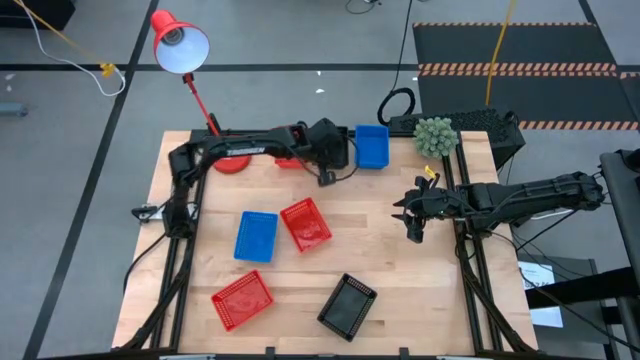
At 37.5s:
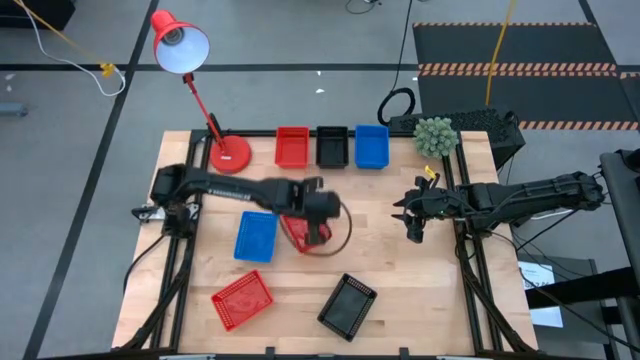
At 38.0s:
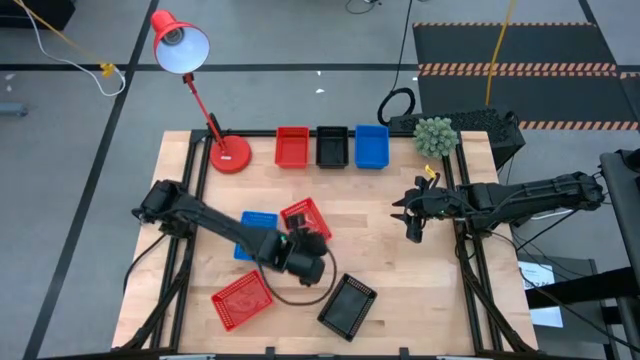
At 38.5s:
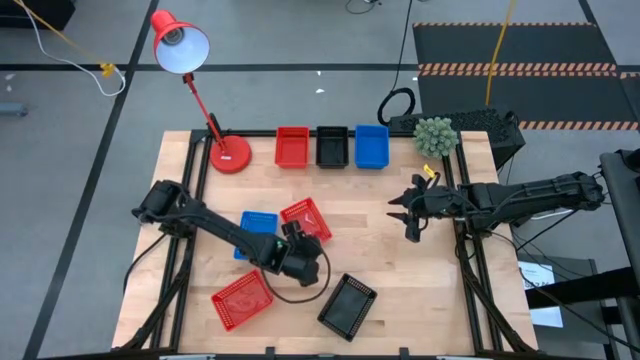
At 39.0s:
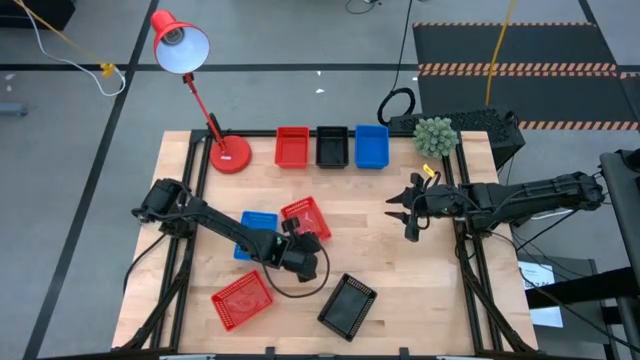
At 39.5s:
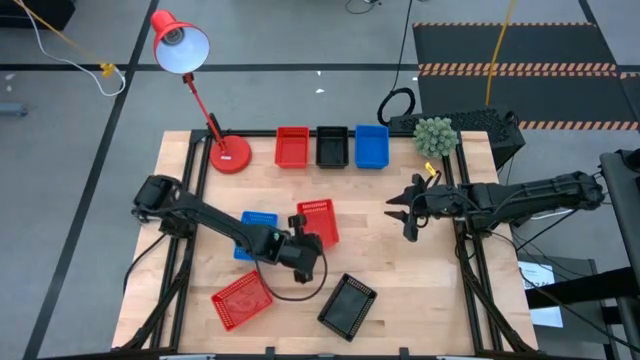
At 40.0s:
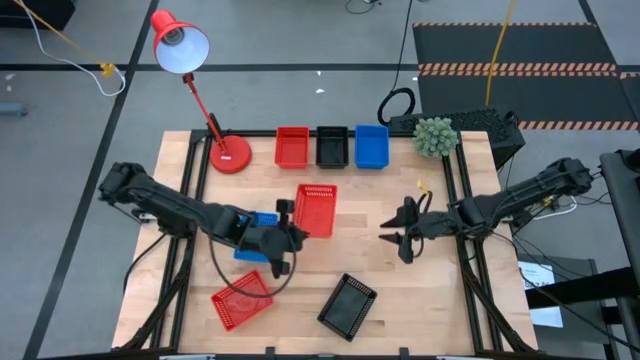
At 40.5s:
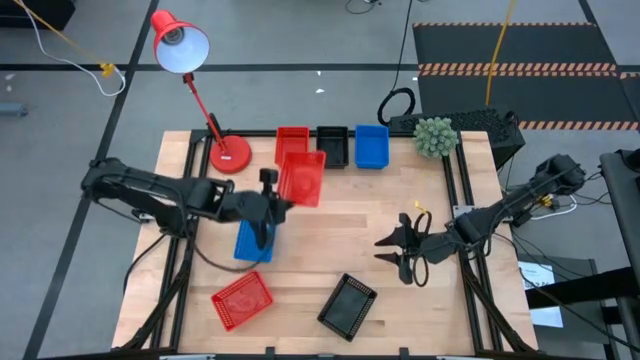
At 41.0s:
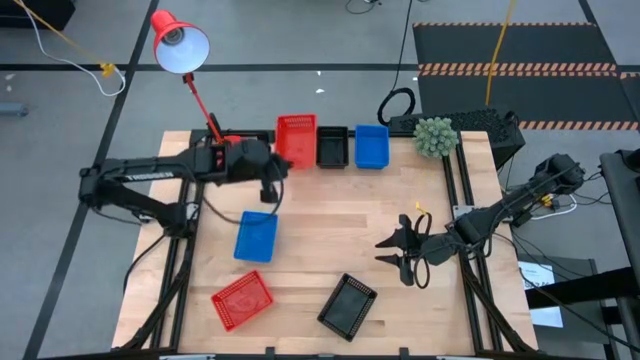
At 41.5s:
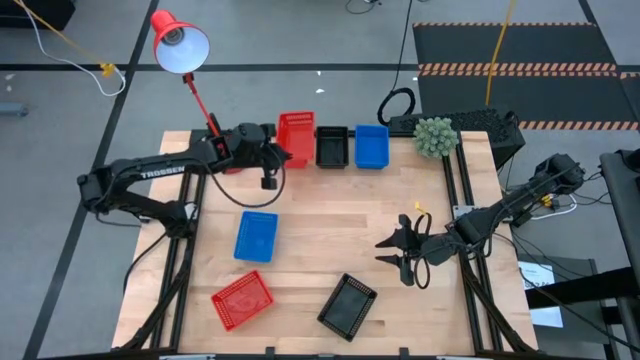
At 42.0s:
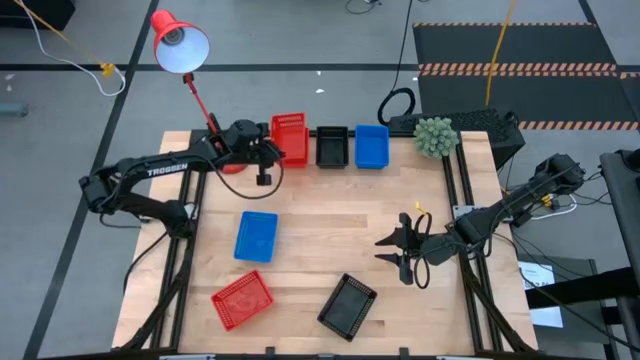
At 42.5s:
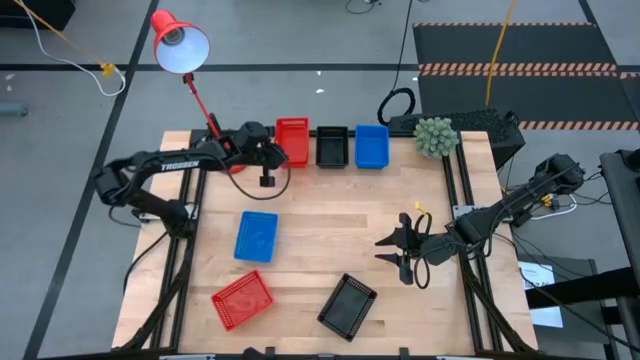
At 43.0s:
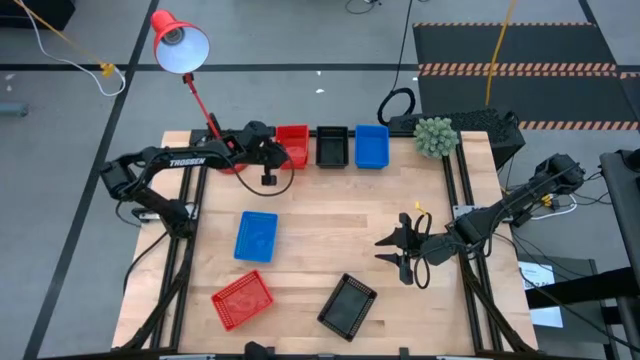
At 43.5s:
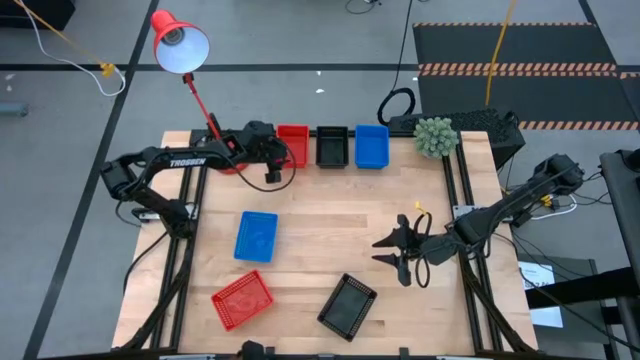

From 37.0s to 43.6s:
Stack the middle red bin on top of the top red bin

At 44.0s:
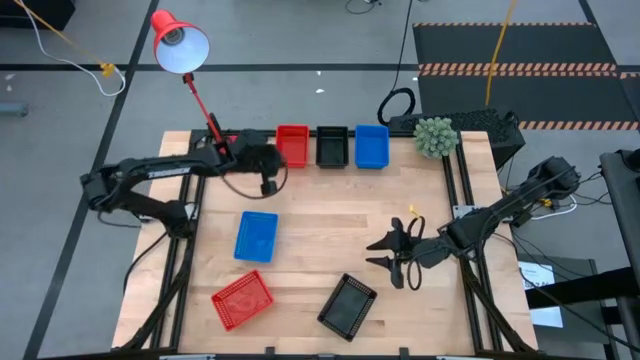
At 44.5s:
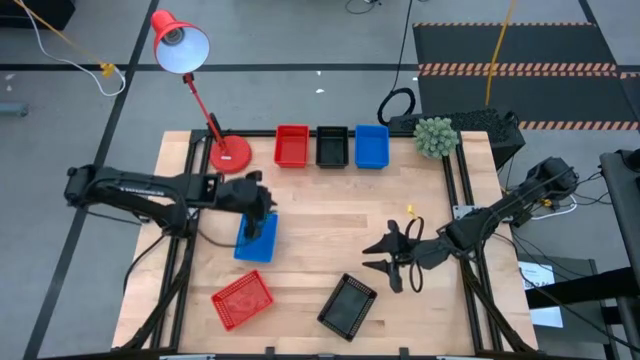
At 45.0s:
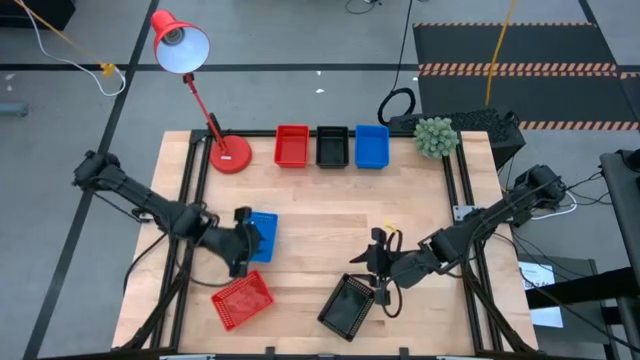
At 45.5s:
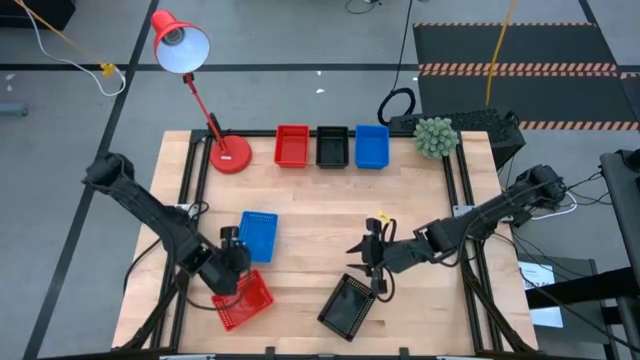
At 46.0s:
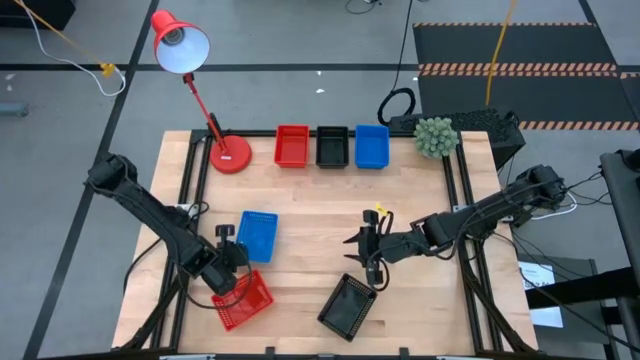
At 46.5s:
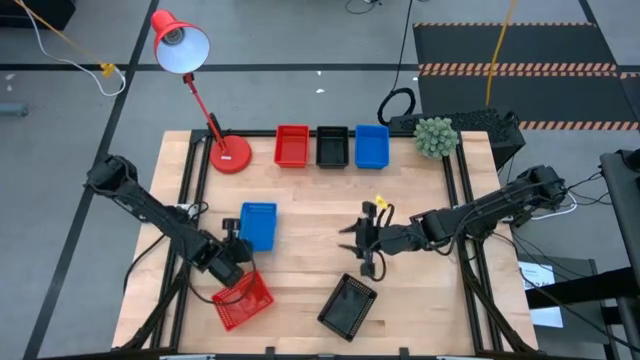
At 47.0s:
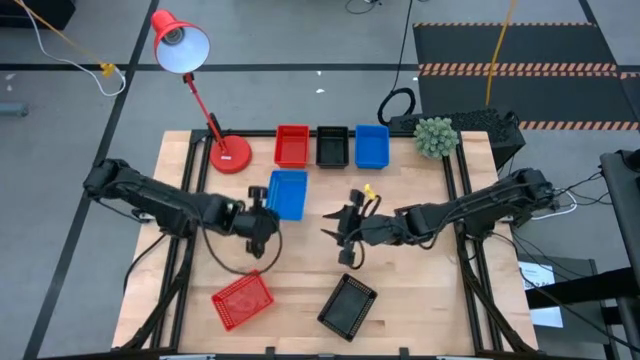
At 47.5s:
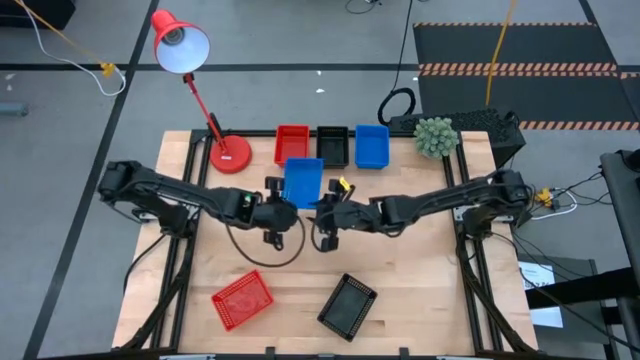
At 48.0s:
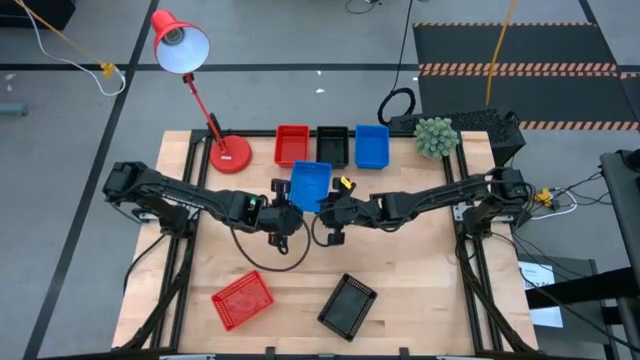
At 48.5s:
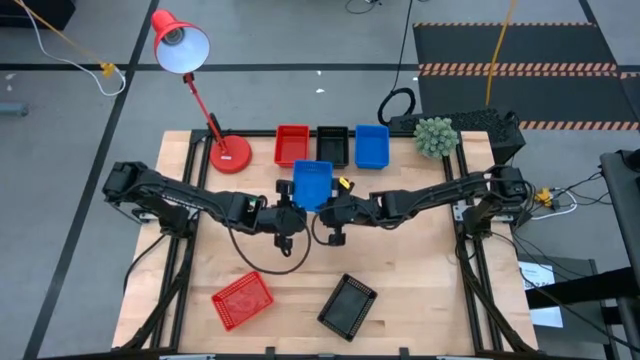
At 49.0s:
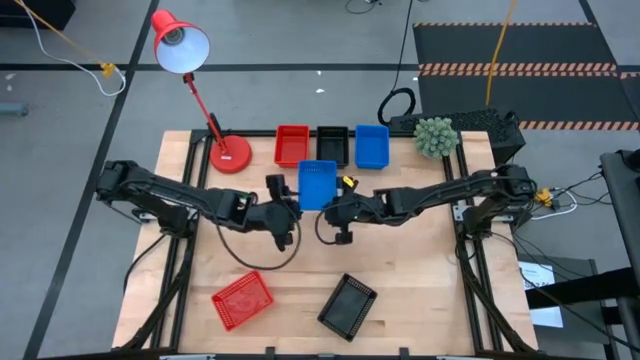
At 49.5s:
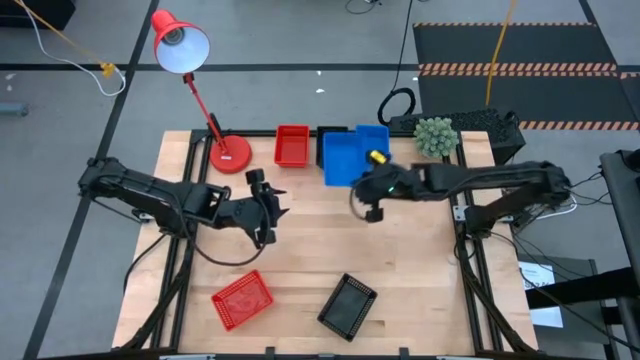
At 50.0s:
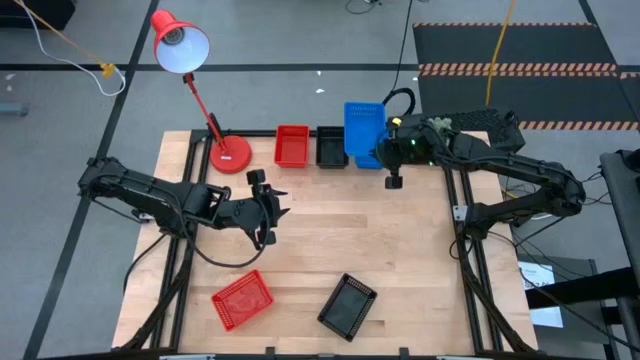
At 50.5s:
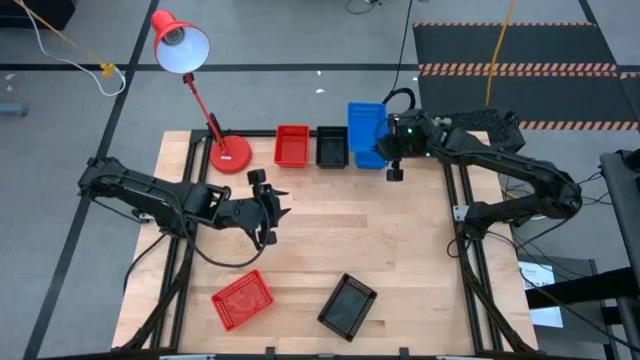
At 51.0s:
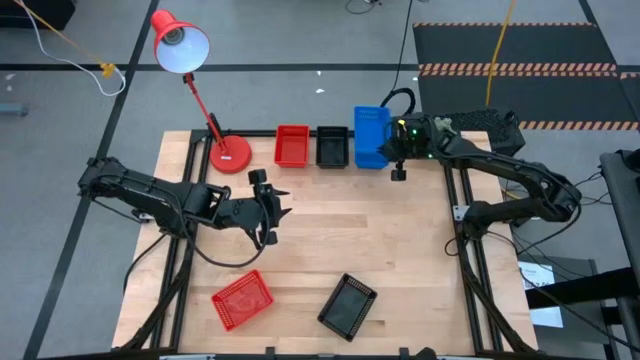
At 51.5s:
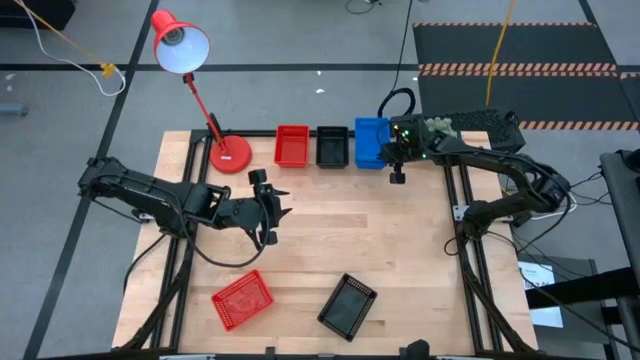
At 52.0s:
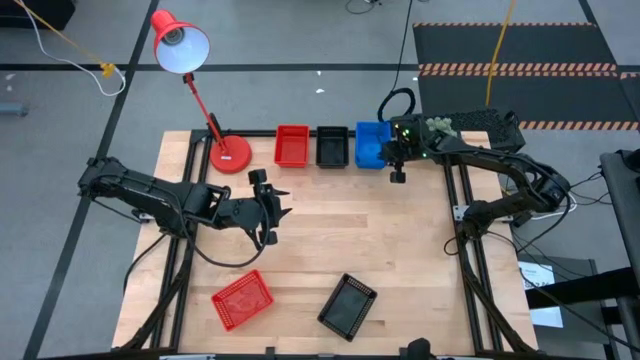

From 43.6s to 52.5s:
Stack the bottom blue bin on top of the top stacked blue bins

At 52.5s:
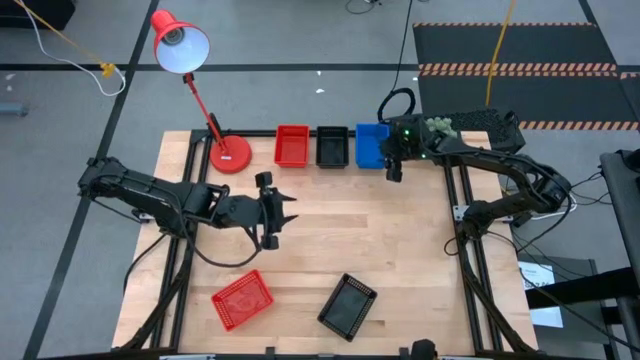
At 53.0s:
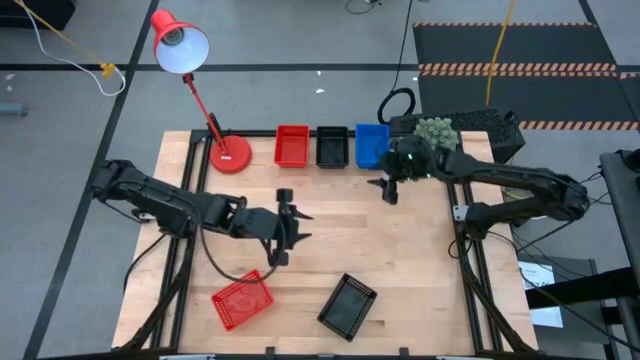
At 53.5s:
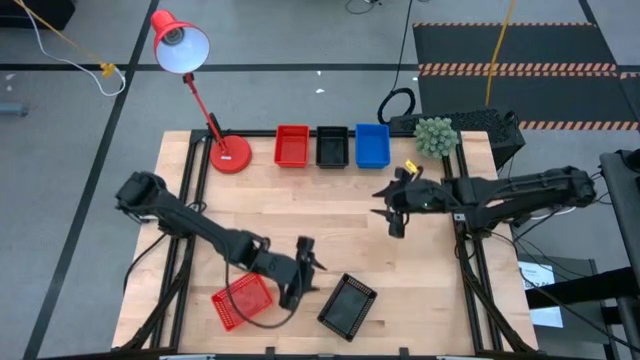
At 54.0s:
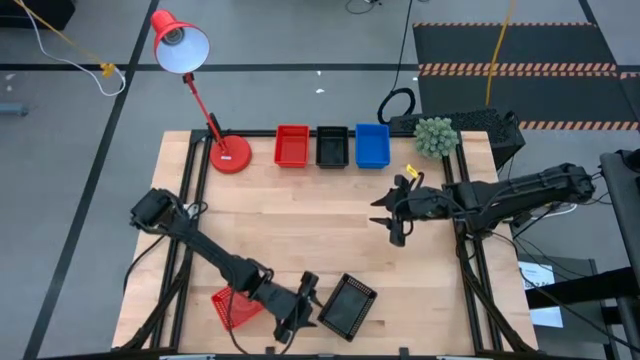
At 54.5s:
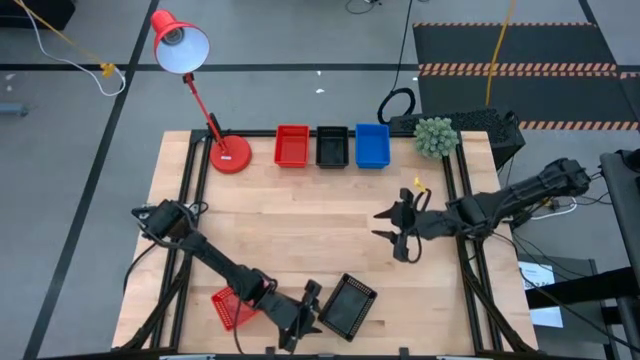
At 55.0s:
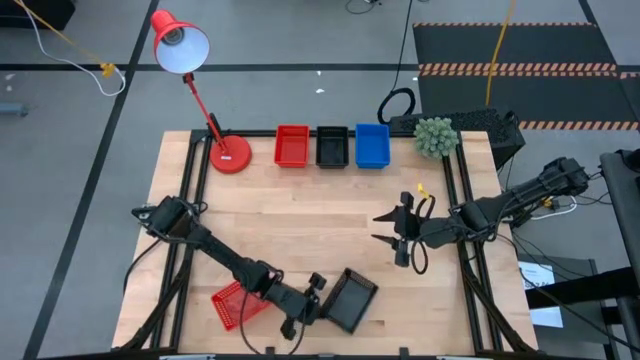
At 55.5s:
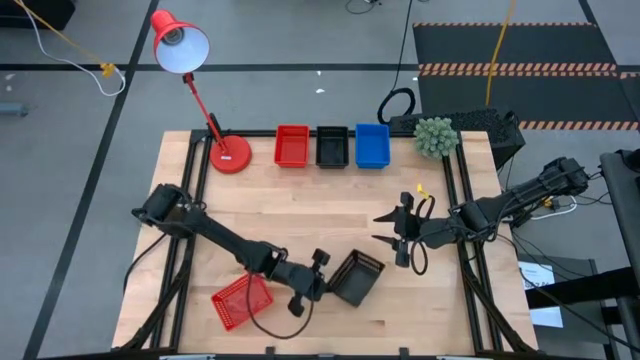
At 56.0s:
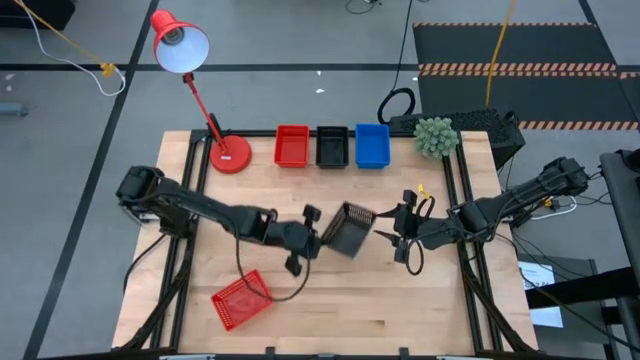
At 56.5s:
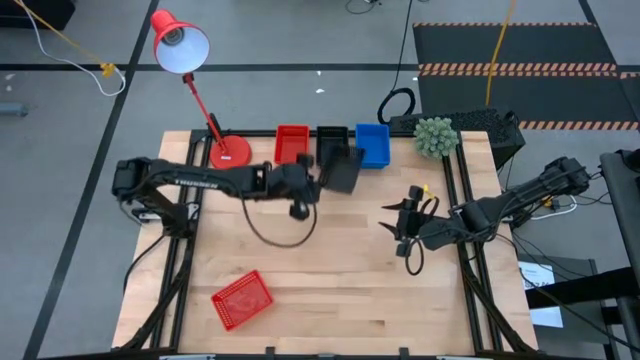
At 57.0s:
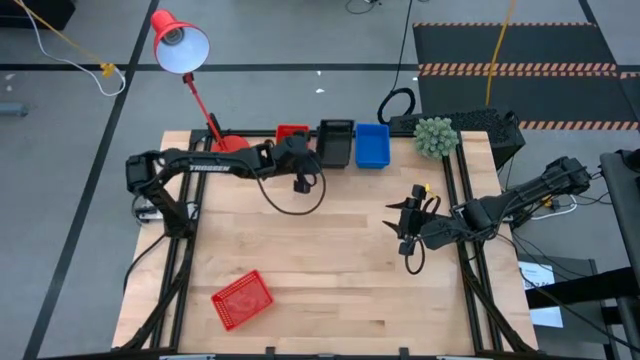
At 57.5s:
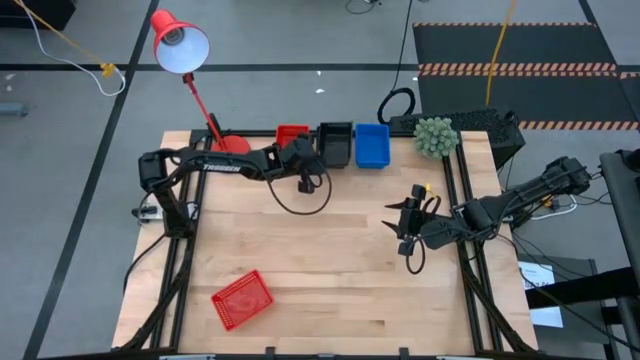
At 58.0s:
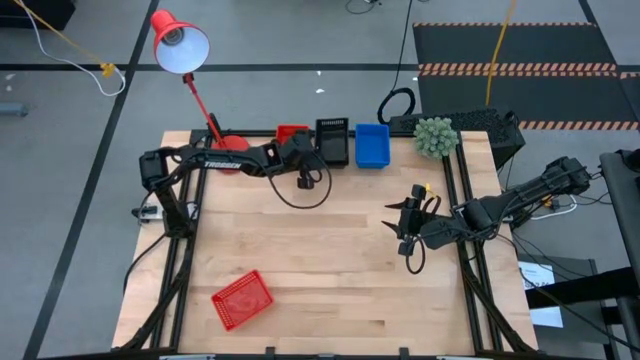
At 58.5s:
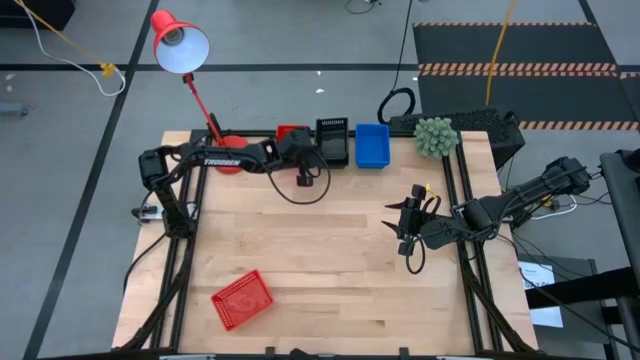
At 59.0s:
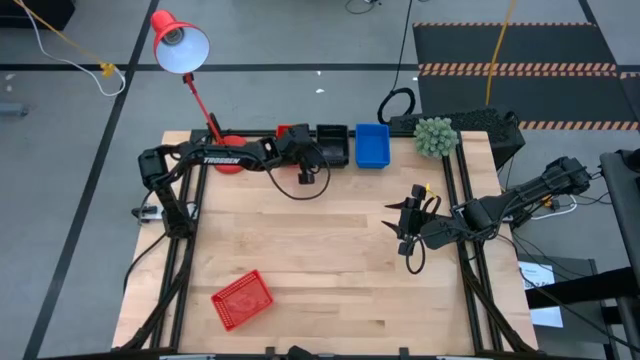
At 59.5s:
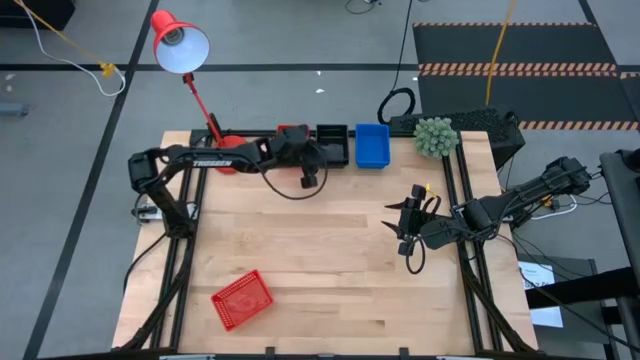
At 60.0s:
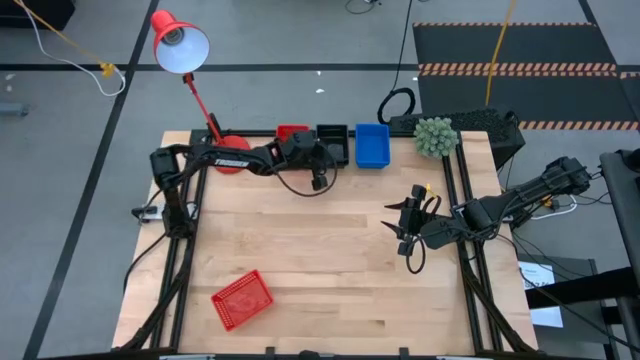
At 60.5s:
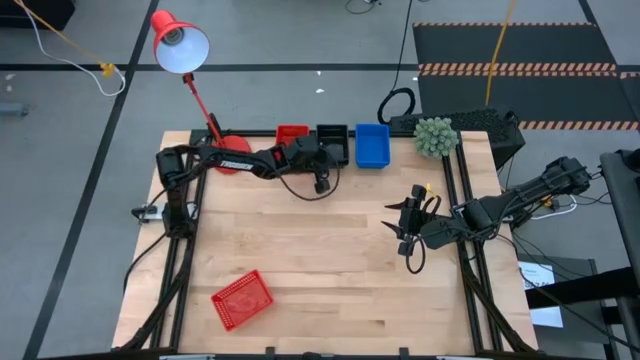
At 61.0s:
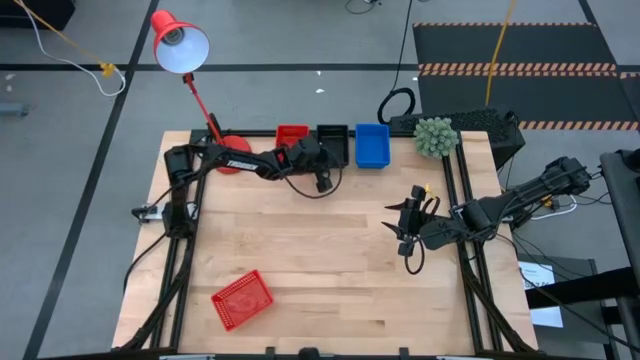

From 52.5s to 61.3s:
Stack the bottom black bin on the top stacked black bins
